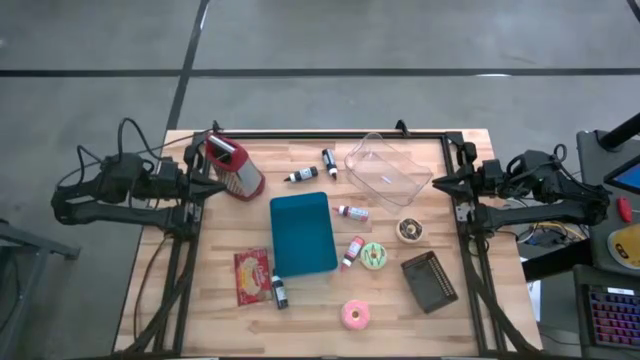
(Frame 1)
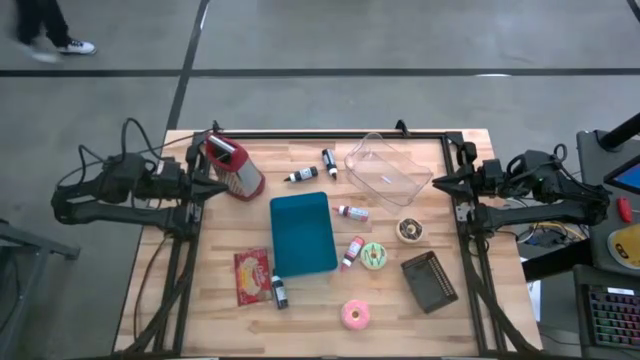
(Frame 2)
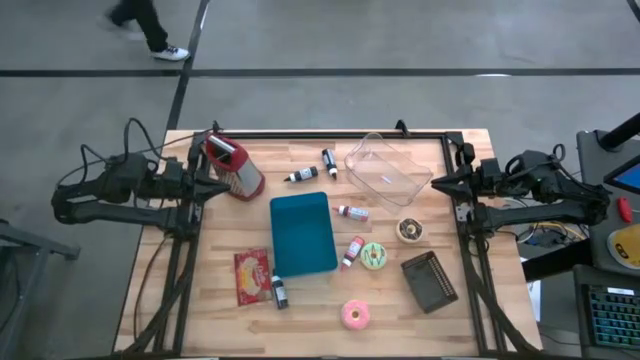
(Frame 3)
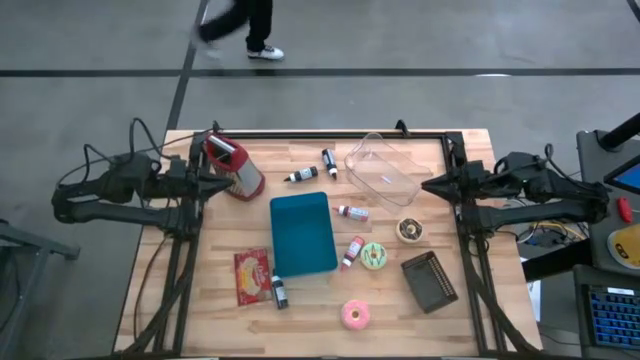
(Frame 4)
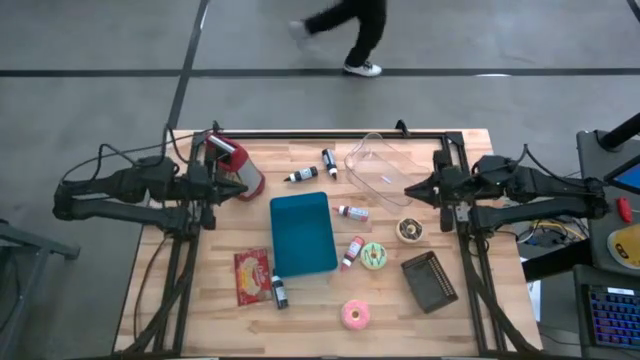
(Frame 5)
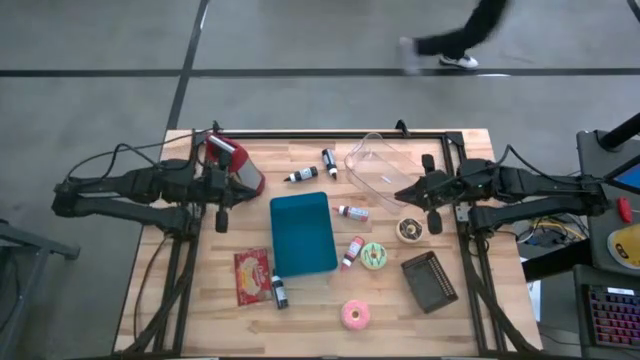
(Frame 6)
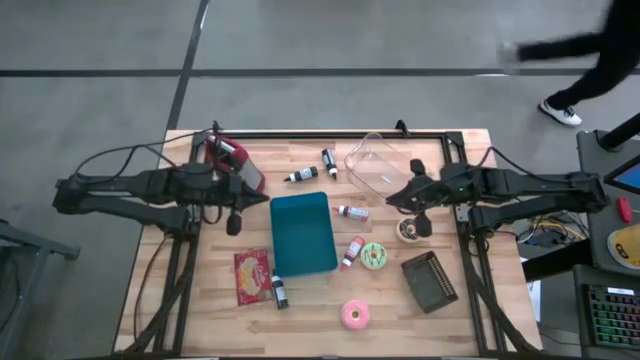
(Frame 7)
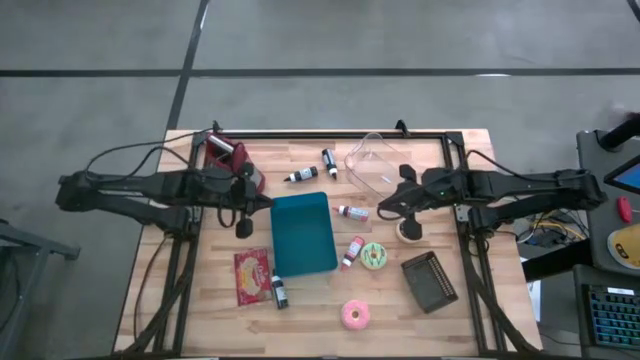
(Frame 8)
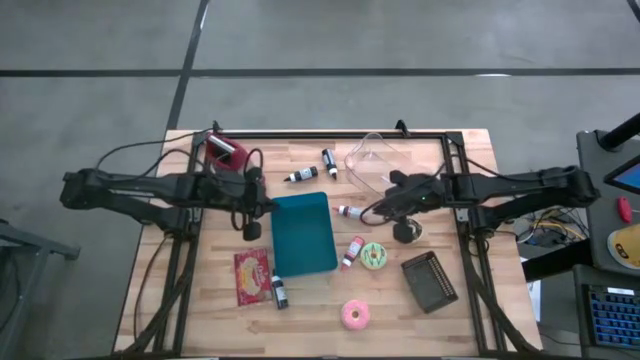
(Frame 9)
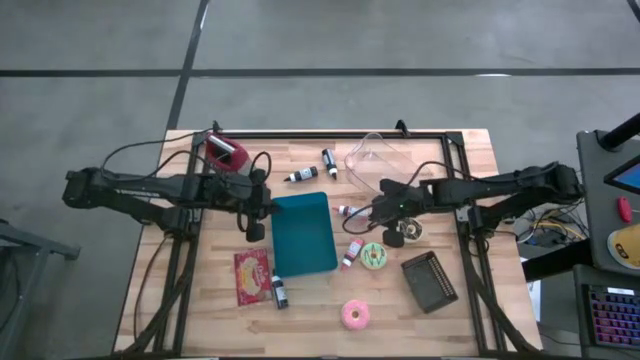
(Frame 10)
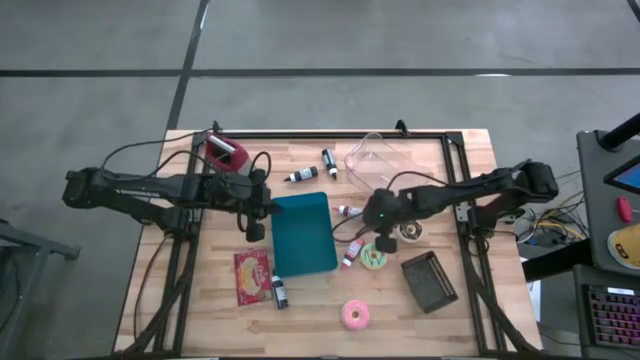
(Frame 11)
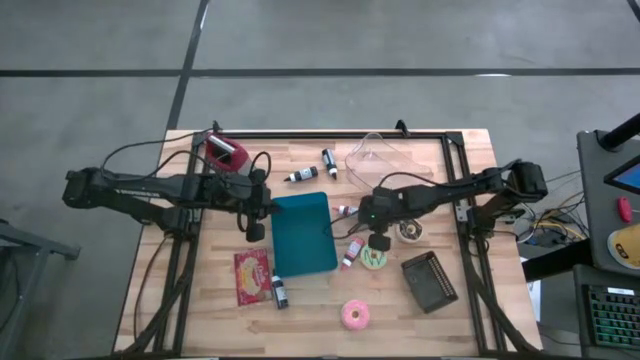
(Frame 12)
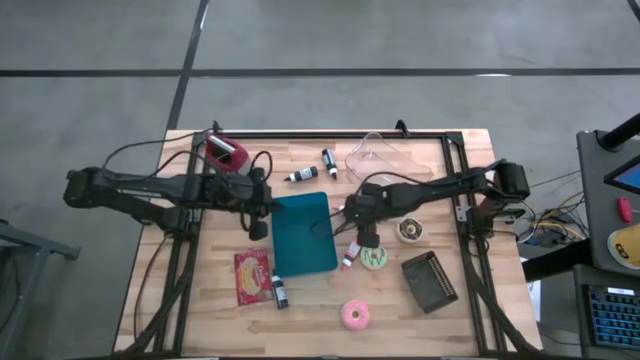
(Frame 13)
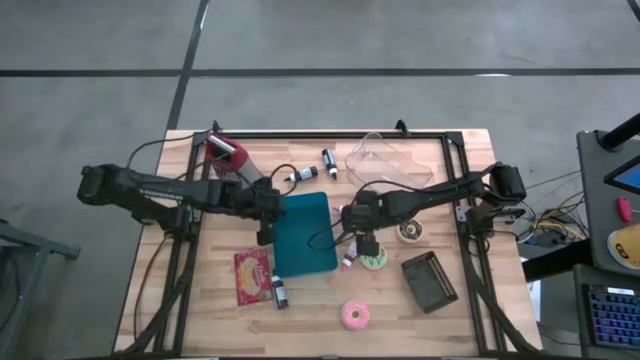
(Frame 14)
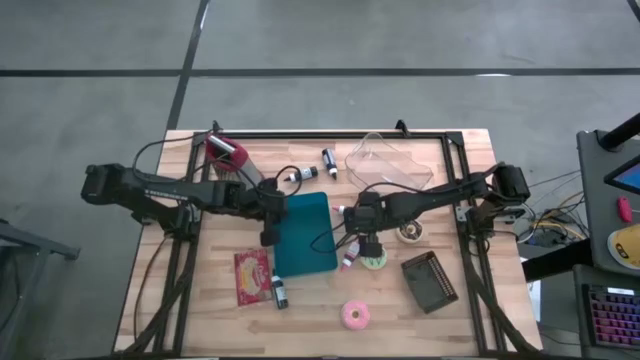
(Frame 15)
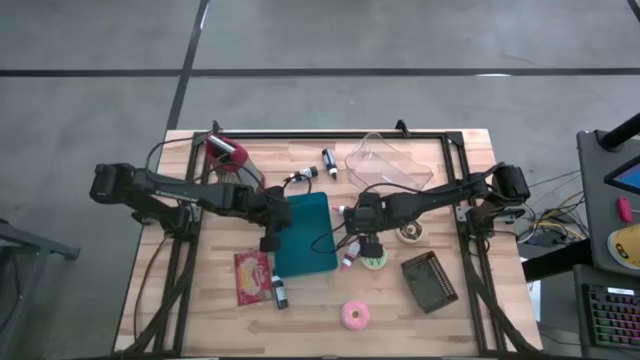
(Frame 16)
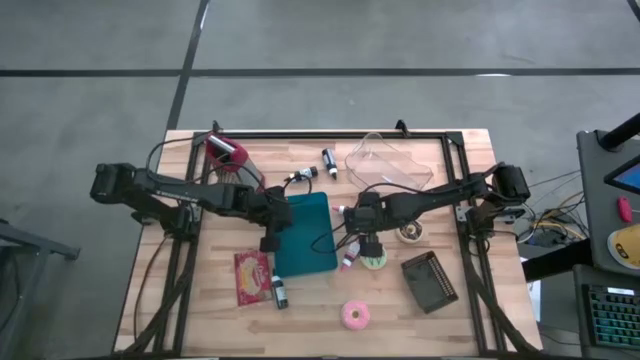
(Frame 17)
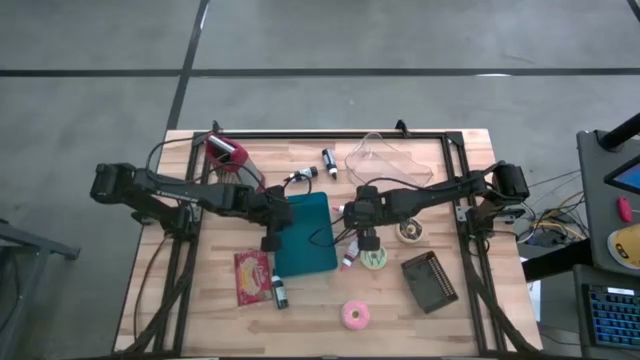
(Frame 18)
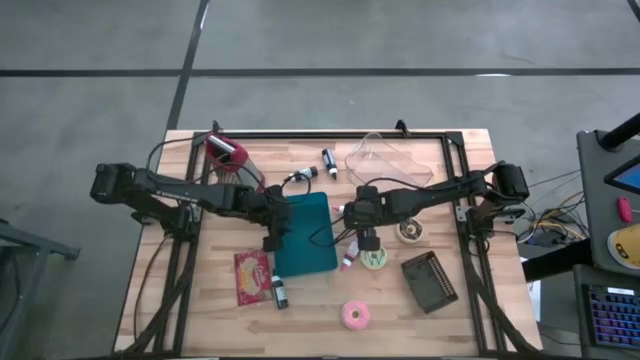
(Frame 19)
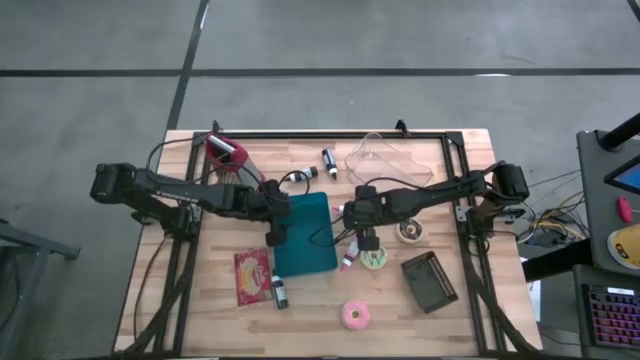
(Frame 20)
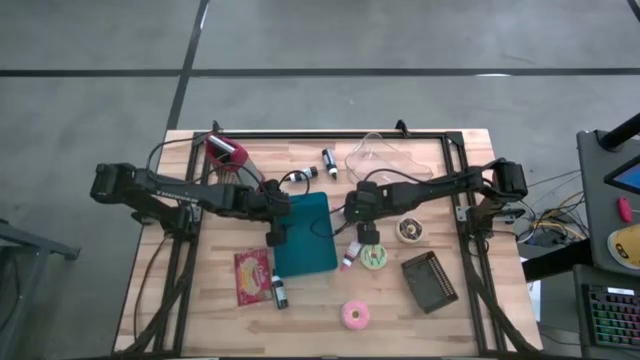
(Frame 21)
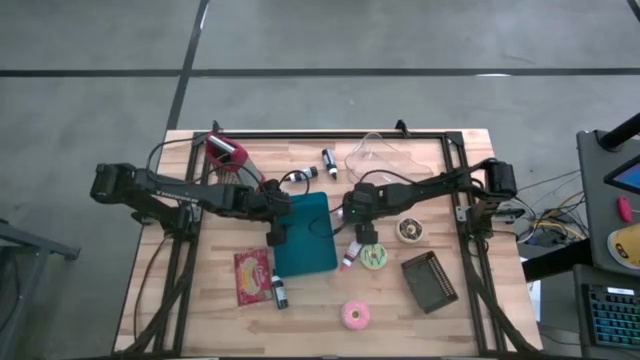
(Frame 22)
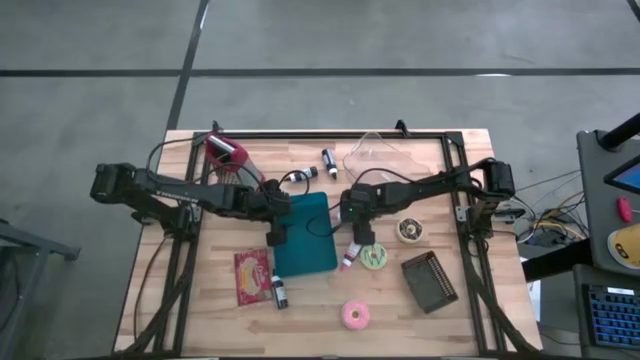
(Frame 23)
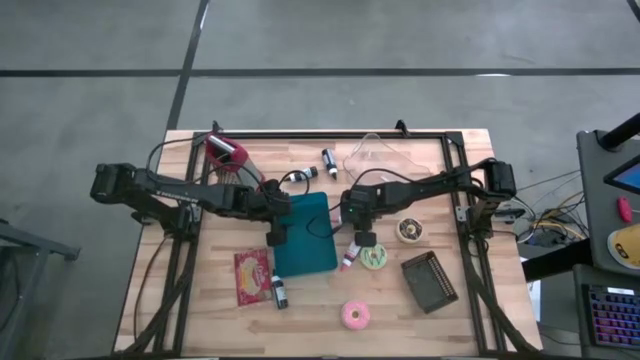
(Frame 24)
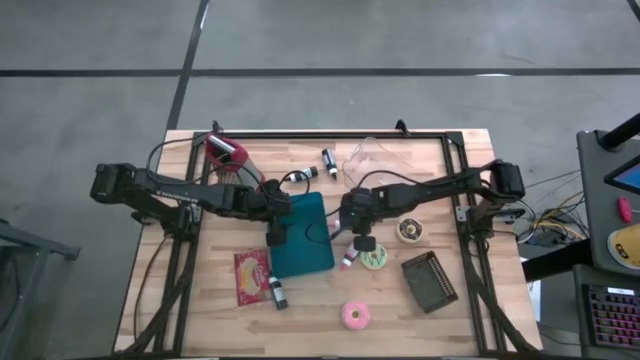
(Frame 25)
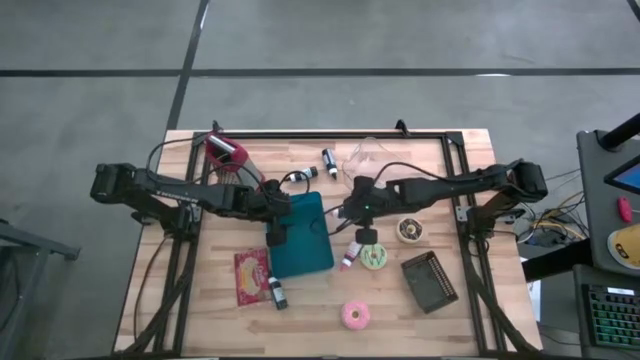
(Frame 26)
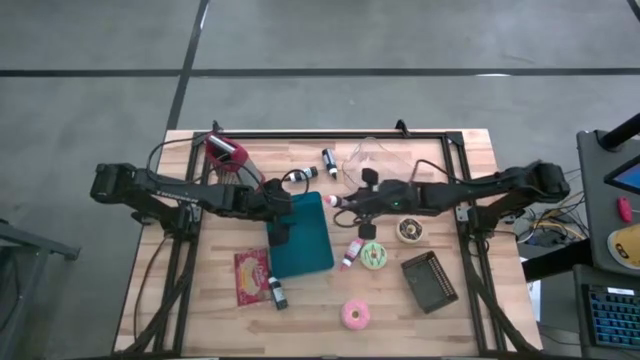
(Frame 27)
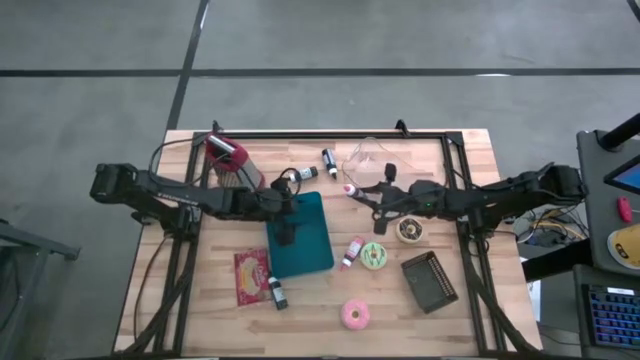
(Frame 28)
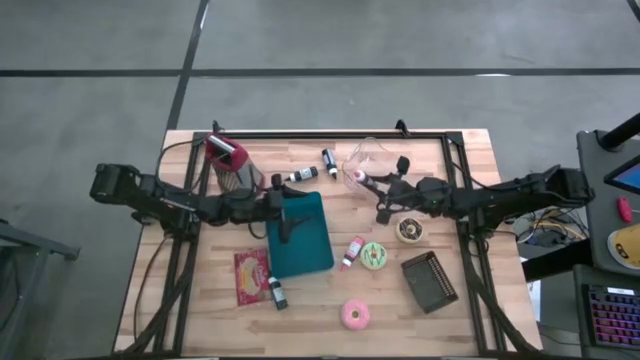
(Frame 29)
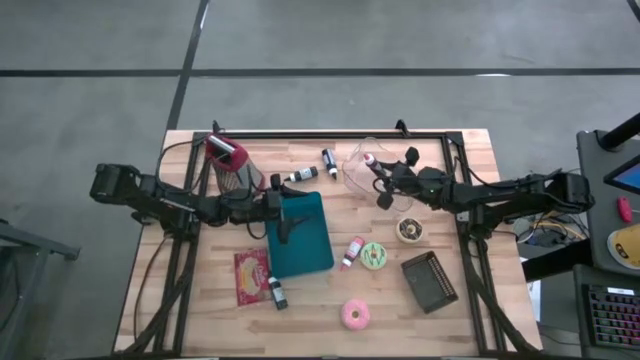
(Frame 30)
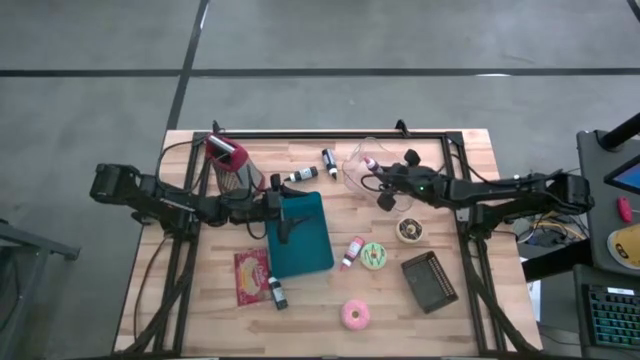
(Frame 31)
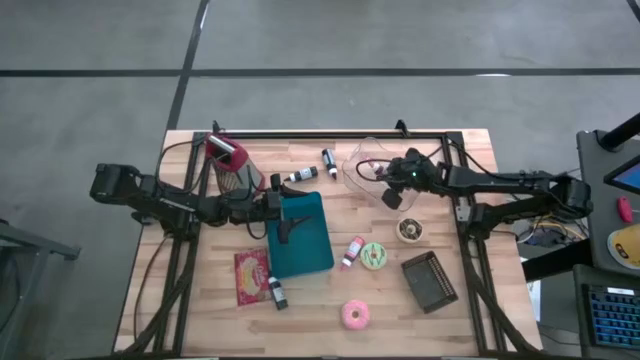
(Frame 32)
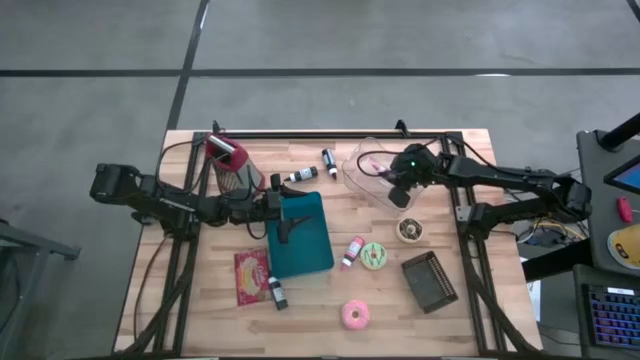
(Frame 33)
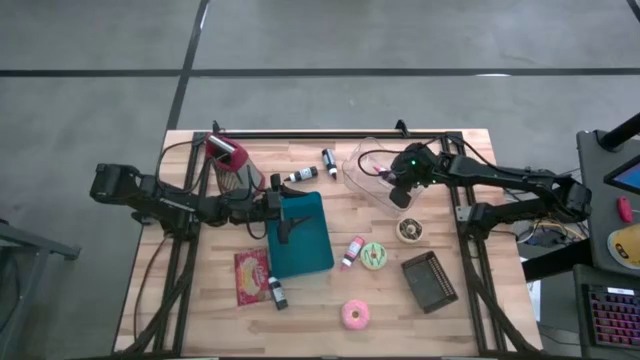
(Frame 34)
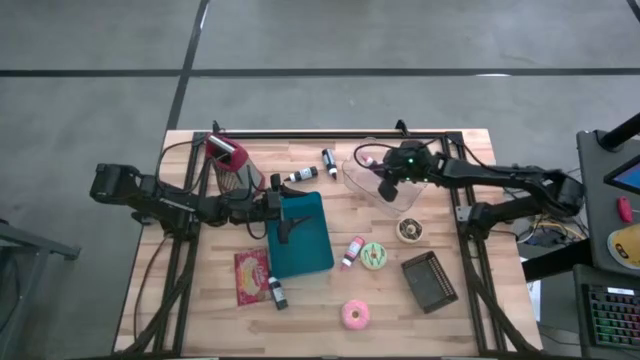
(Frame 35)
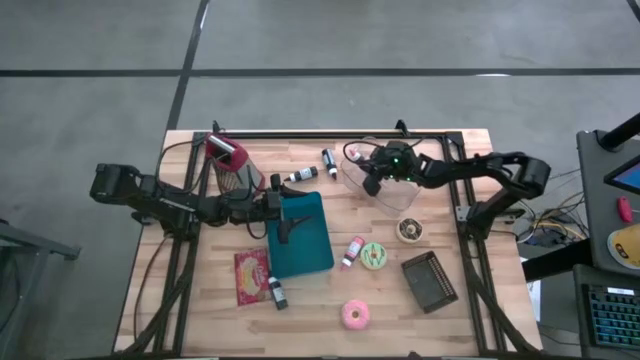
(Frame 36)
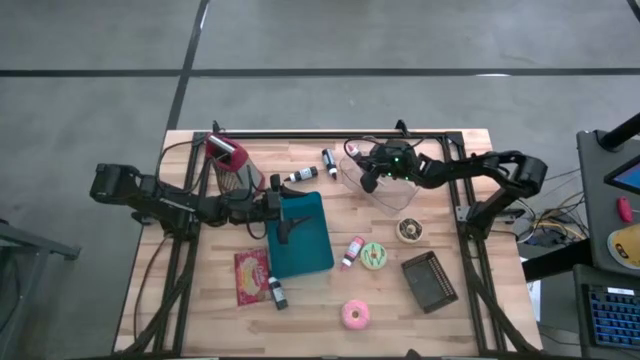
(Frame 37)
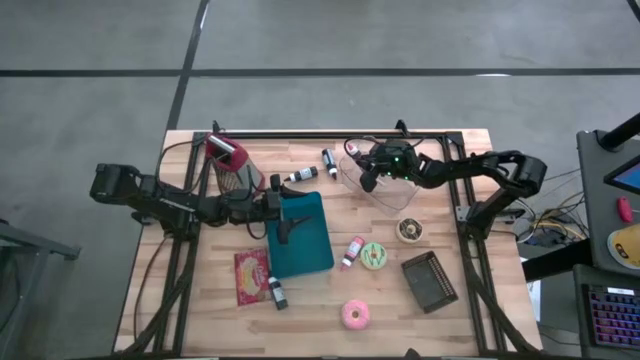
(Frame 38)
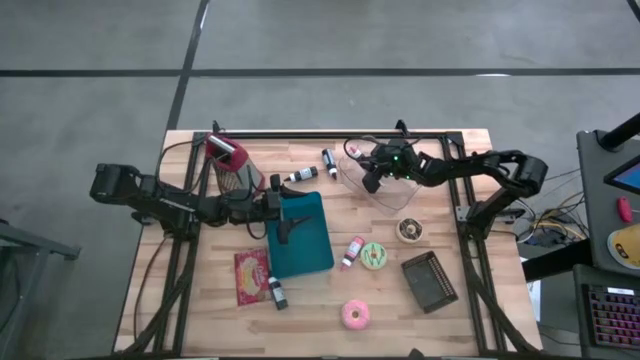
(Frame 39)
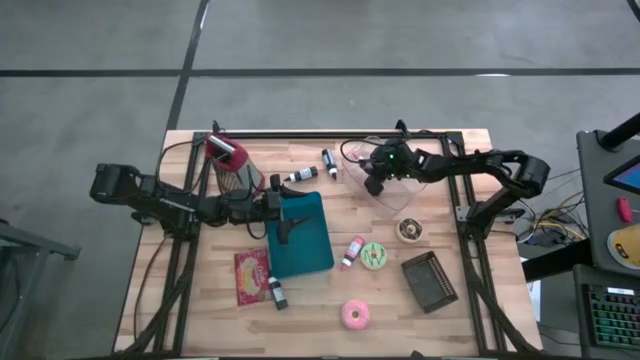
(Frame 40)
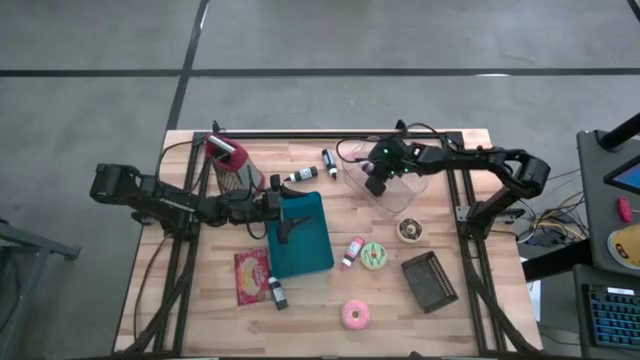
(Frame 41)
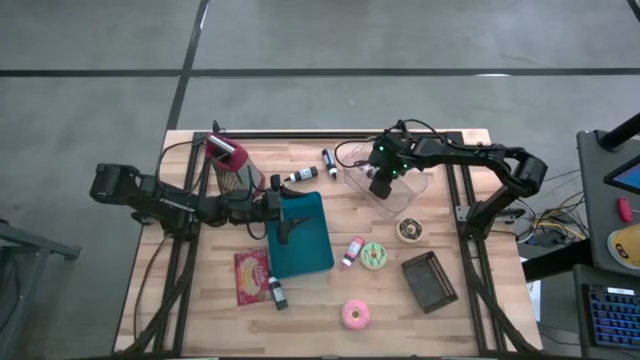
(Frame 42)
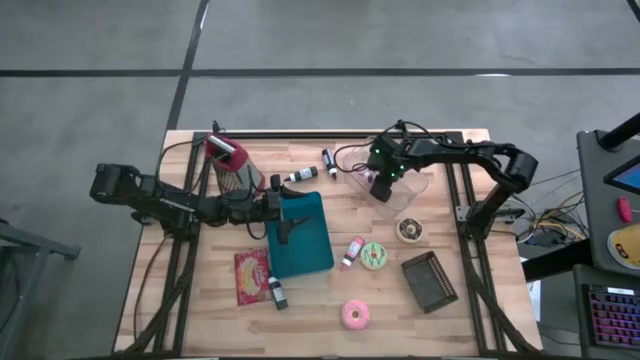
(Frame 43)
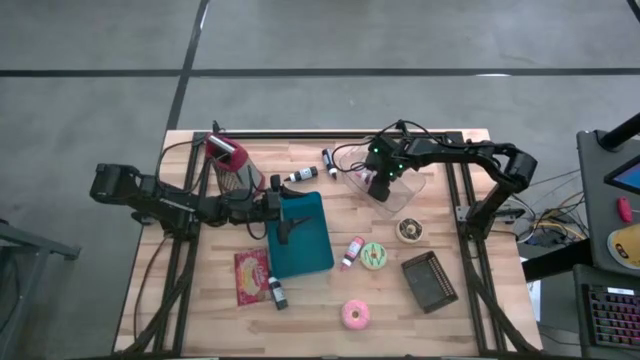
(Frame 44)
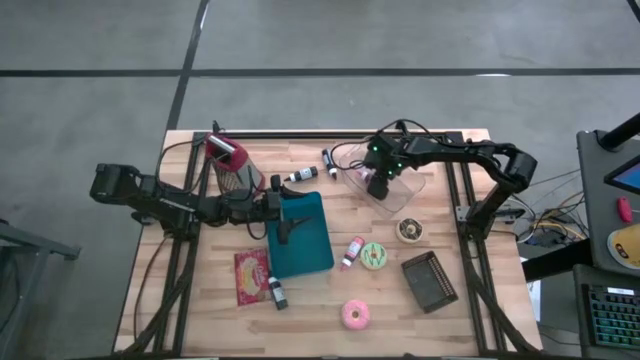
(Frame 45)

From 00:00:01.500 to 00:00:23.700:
Task: Pick & Place Food Item
Put the top pink food coloring bottle into the transparent bin
